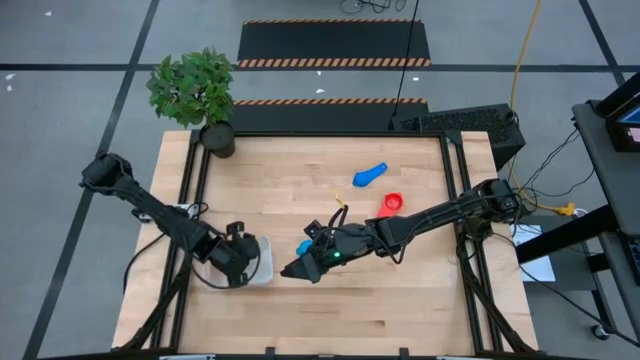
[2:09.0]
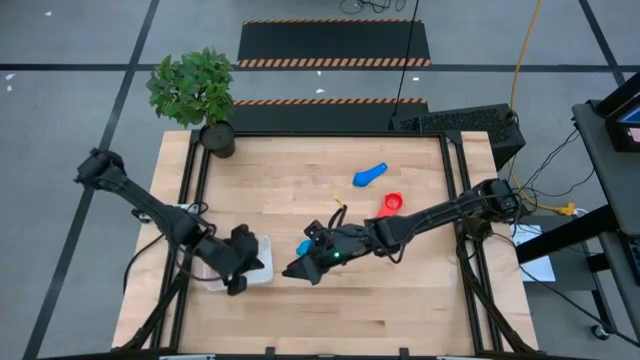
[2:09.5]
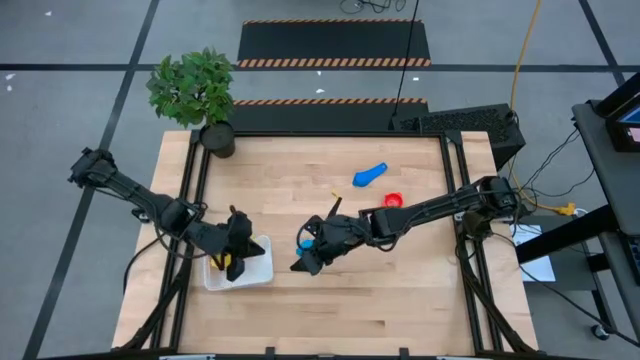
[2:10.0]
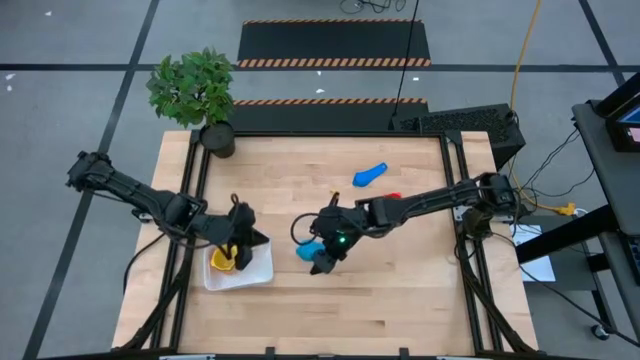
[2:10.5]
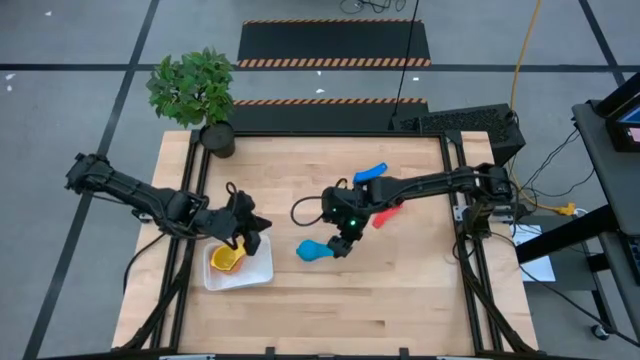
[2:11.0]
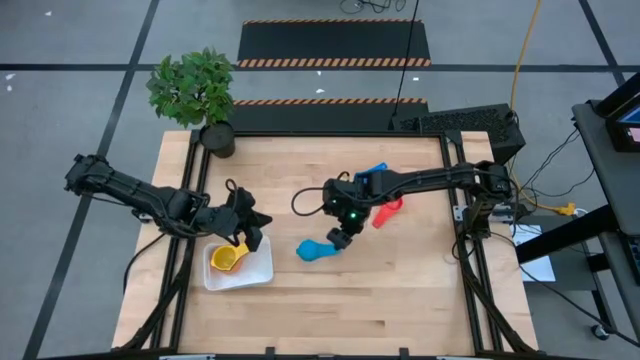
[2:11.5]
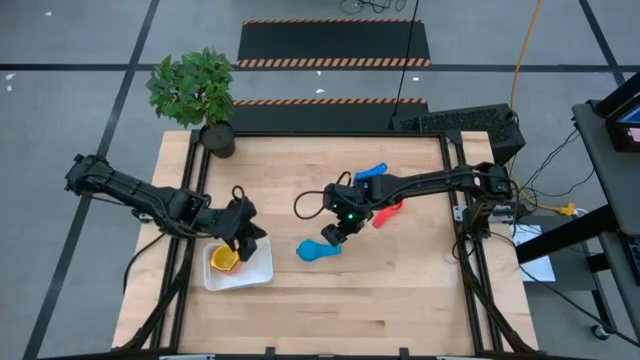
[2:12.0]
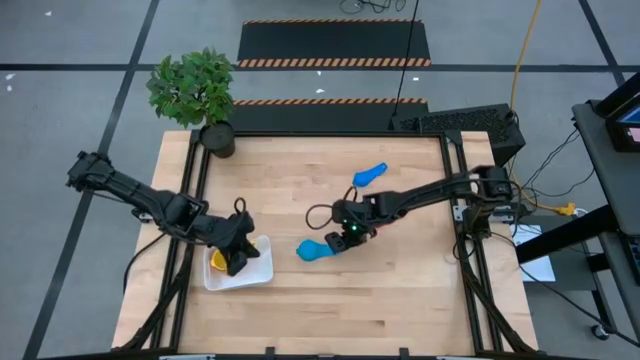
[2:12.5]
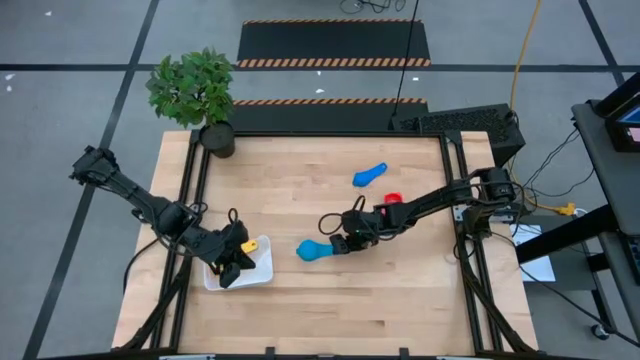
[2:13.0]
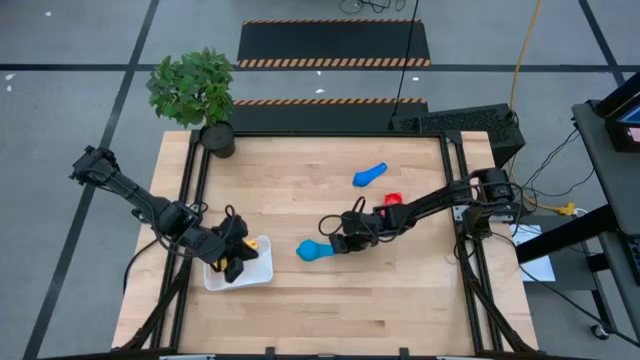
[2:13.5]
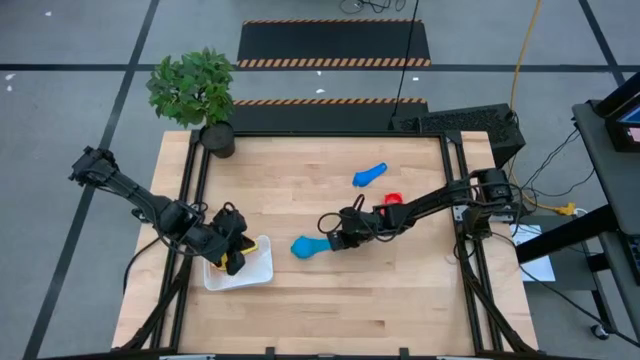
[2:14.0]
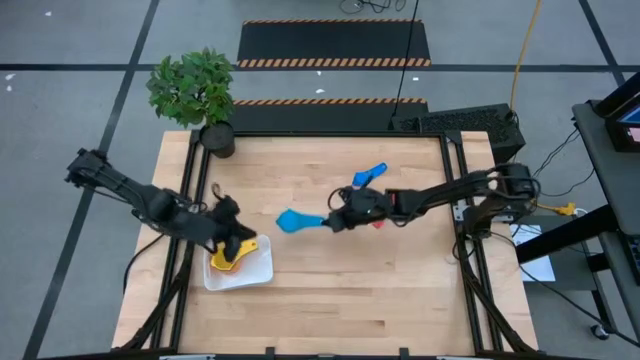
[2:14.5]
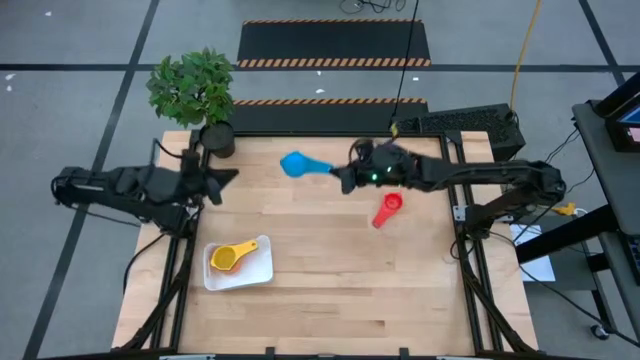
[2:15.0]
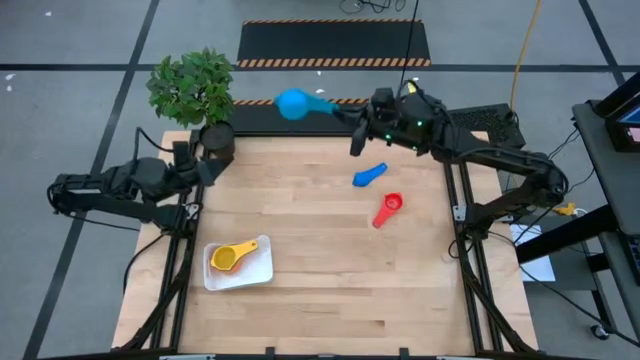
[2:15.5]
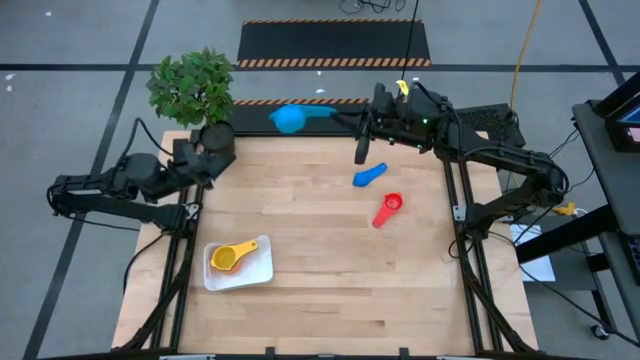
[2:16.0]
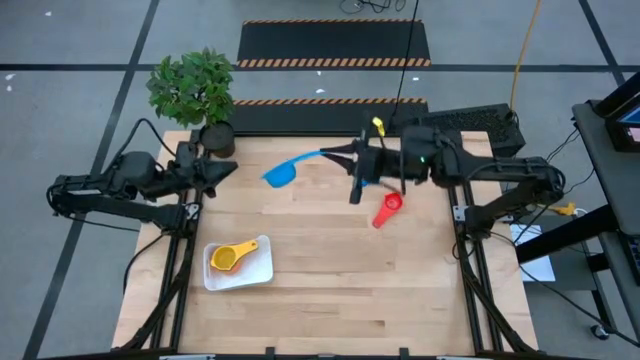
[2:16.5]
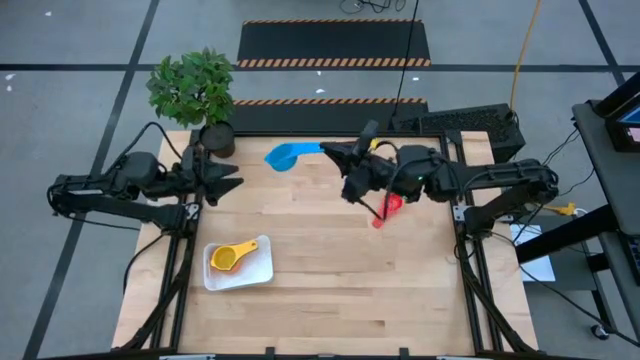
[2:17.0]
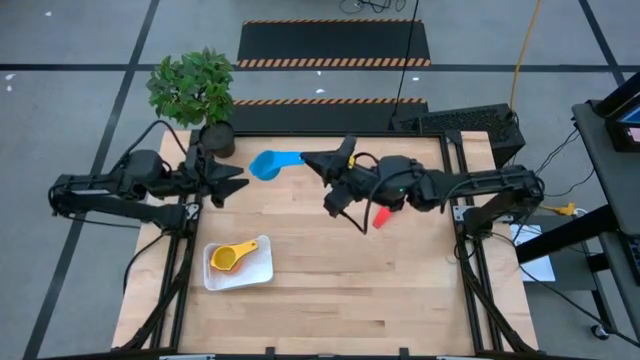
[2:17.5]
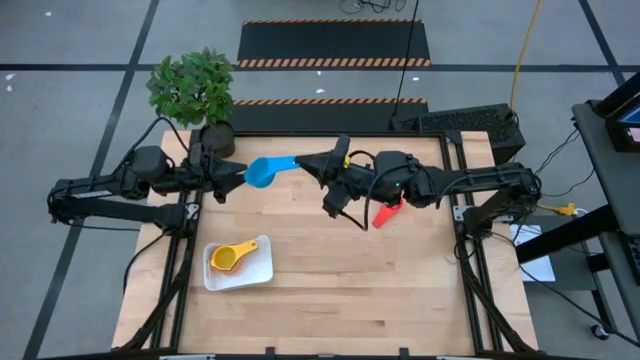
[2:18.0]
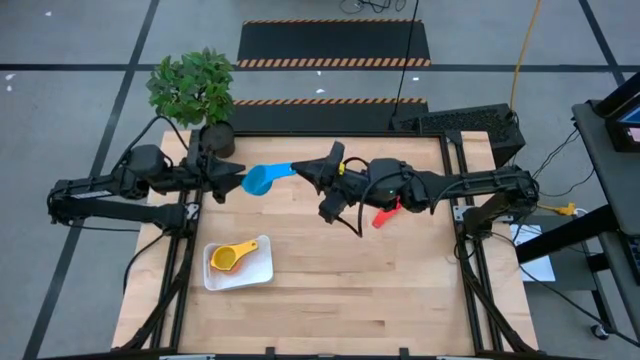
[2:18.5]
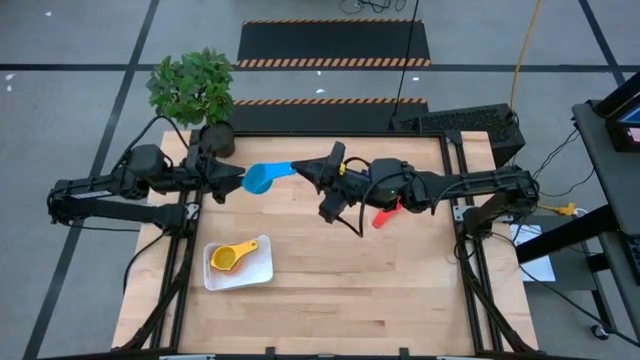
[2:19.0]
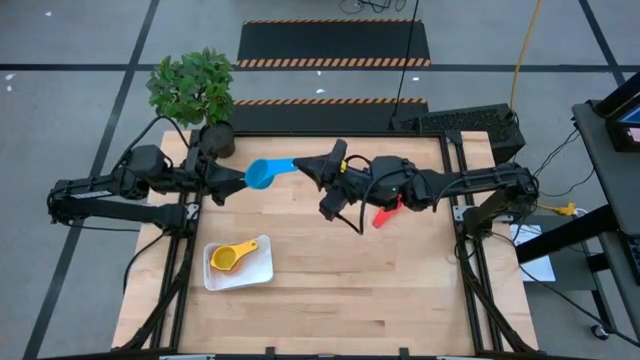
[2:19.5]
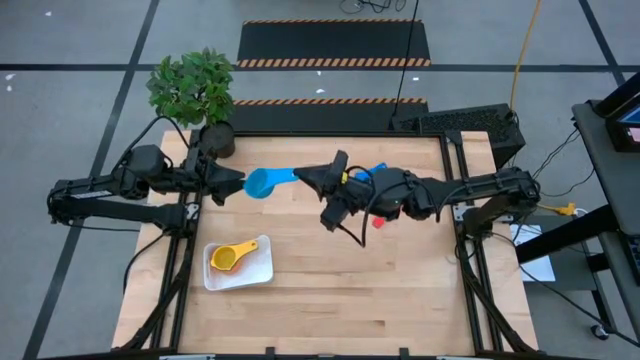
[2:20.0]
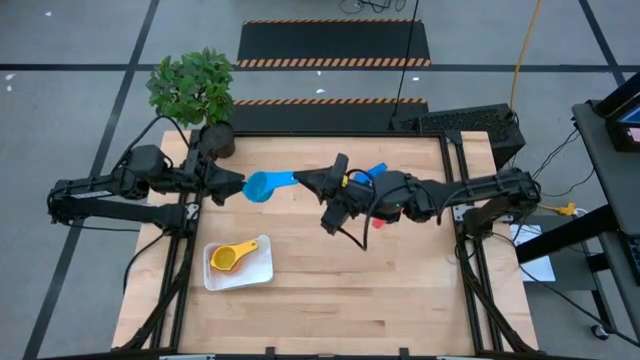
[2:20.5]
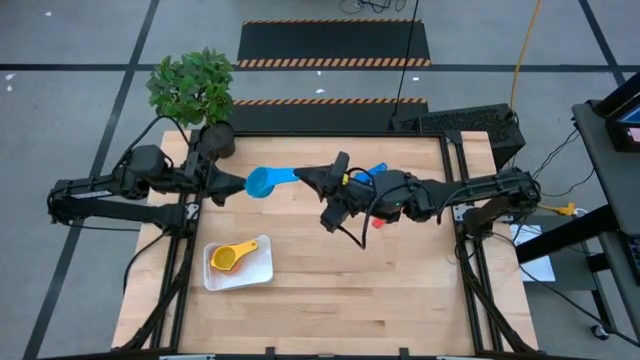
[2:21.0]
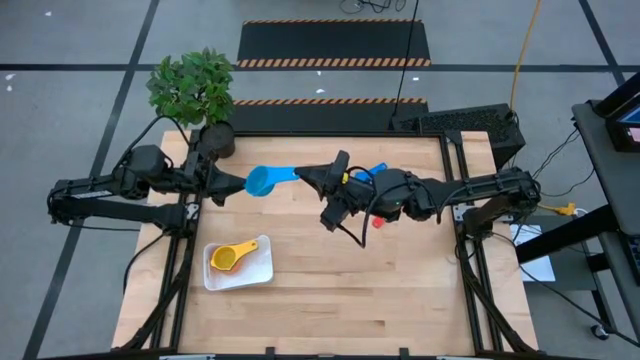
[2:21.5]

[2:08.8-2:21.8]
Task: Nest measuring cups in basket
Stack the light blue measuring cup on top of the yellow measuring cup in the white bin

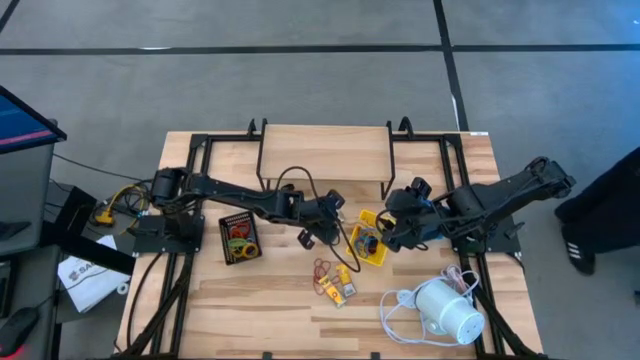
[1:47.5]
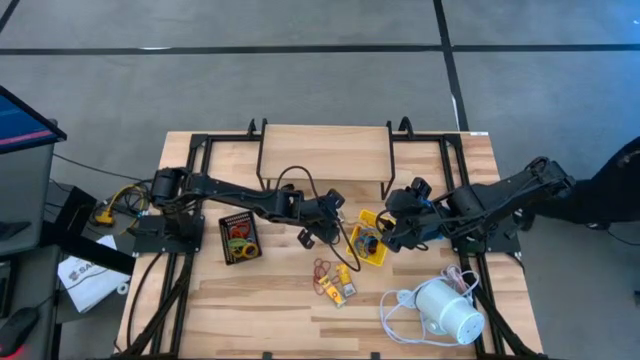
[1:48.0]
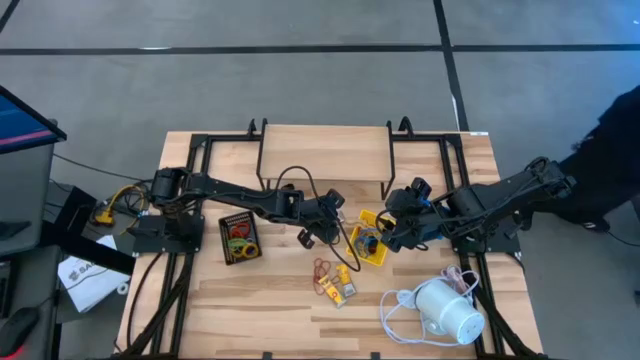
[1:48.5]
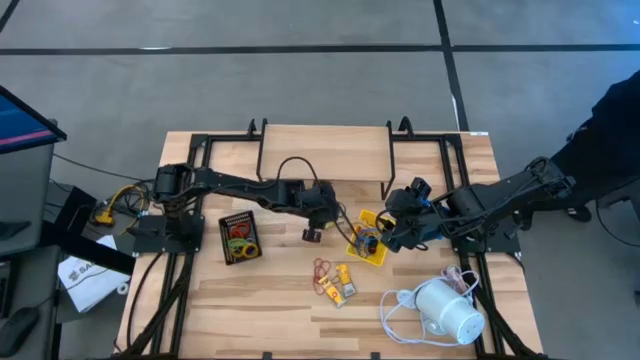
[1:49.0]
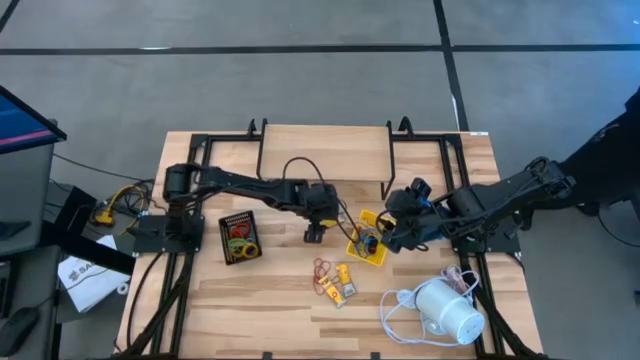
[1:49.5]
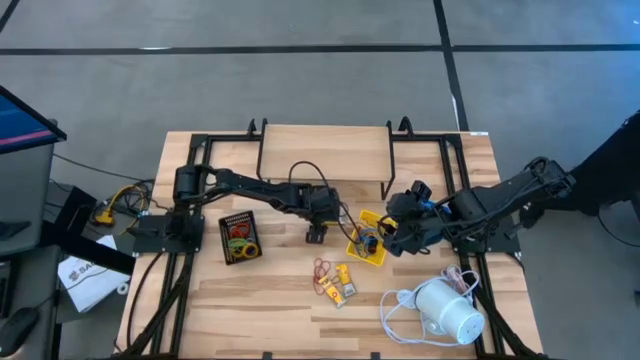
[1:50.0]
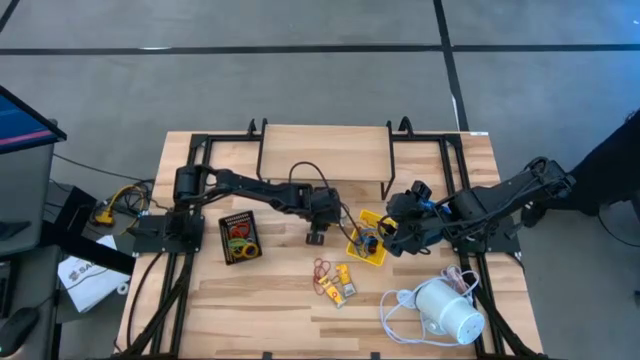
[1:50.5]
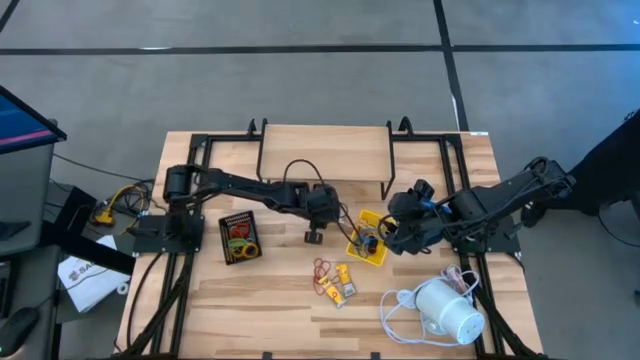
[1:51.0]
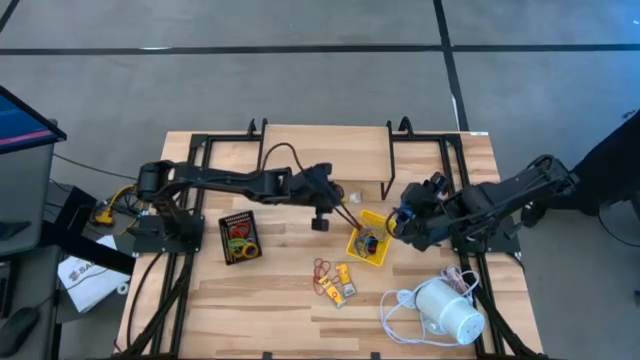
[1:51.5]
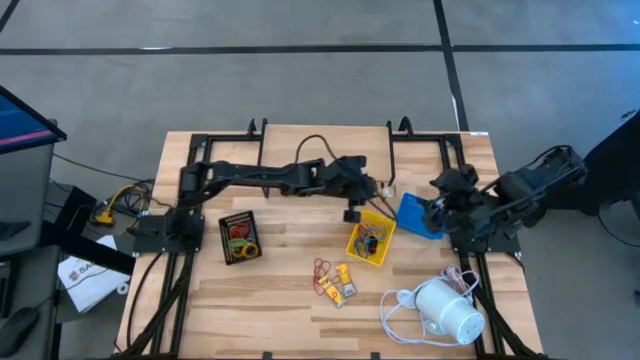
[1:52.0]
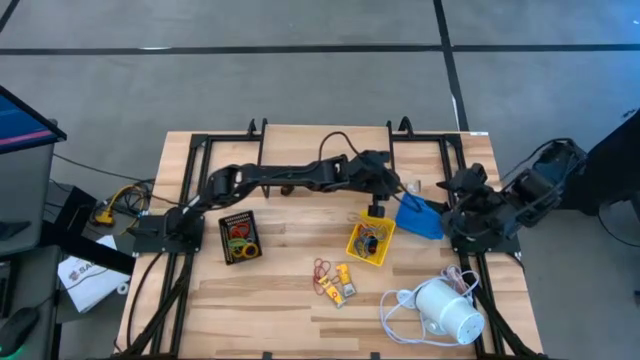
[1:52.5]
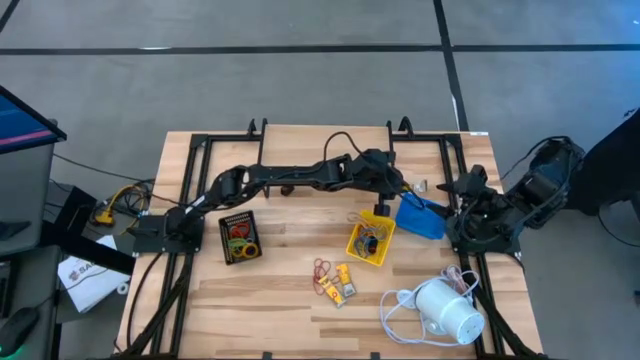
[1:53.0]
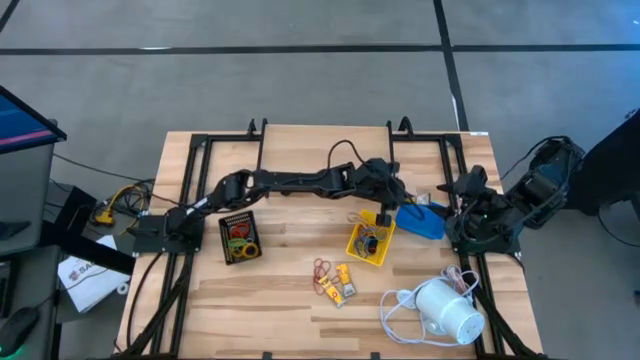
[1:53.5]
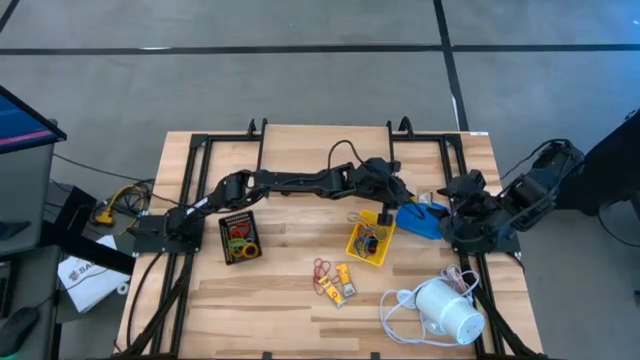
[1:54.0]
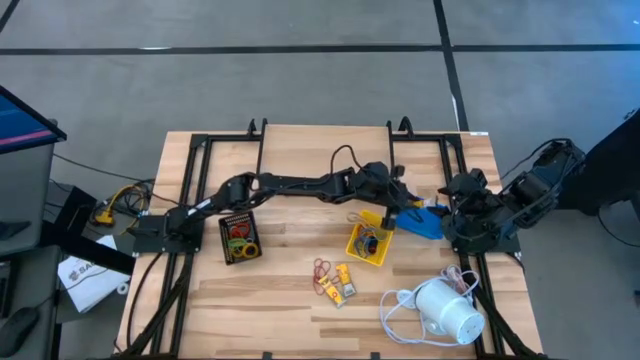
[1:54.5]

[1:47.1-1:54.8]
Task: Pick & Place Office Desk Supplies
Put the yellow crayon box into the blue bin

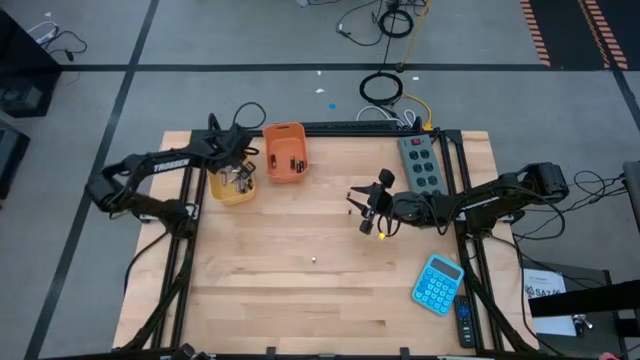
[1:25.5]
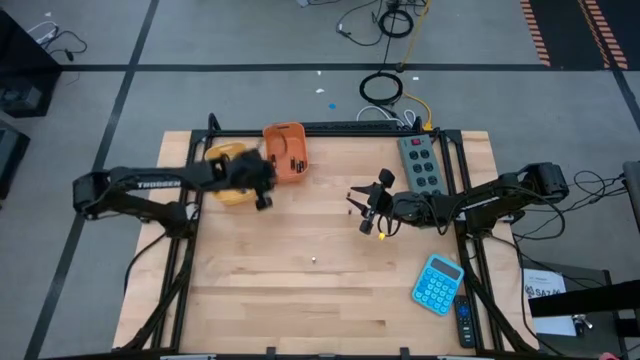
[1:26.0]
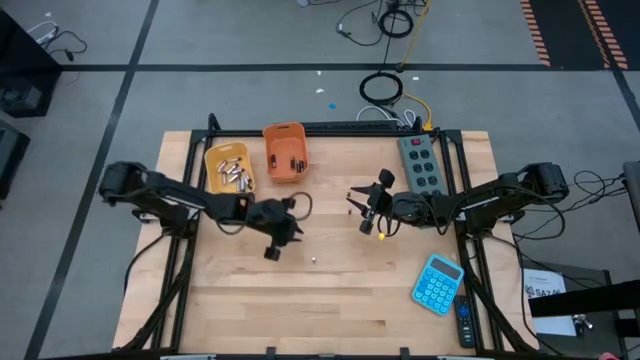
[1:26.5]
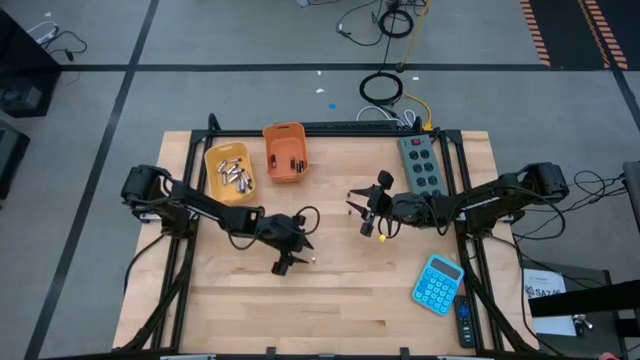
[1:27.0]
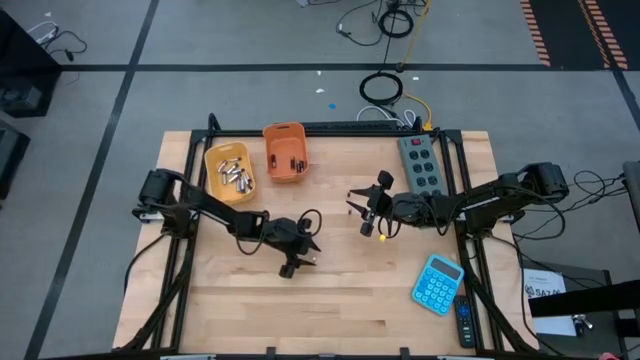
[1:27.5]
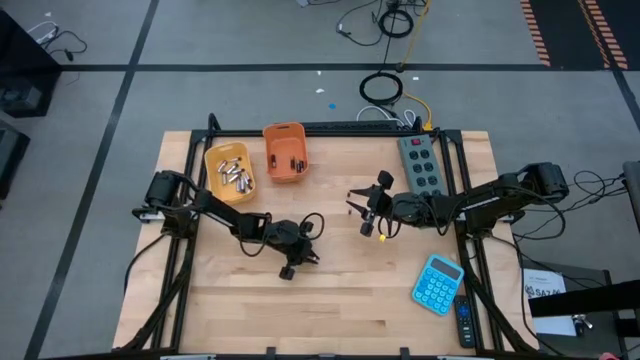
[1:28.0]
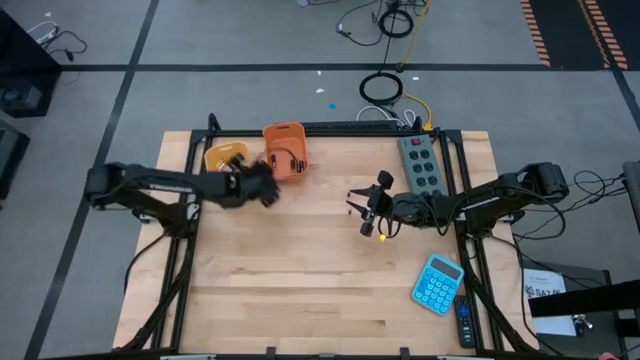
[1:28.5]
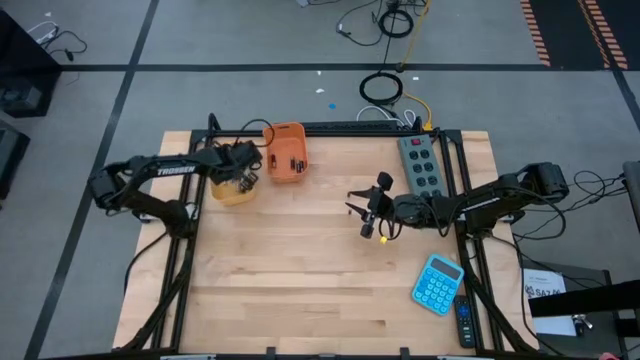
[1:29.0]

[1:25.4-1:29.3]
Task: Sort batteries
Put the silver battery into the yellow bin
